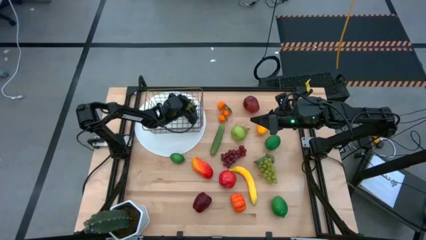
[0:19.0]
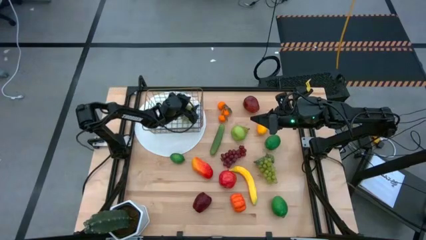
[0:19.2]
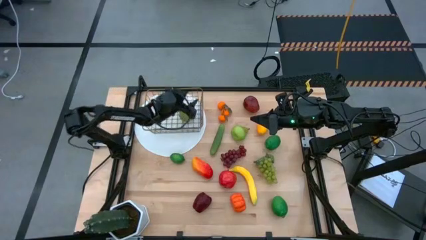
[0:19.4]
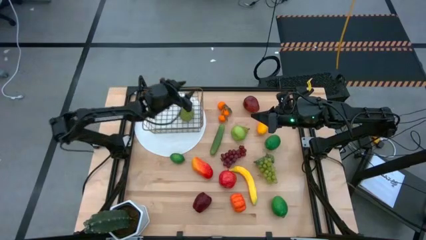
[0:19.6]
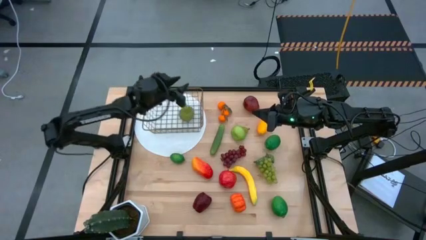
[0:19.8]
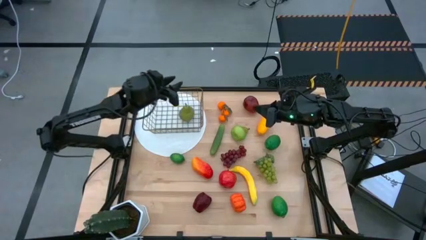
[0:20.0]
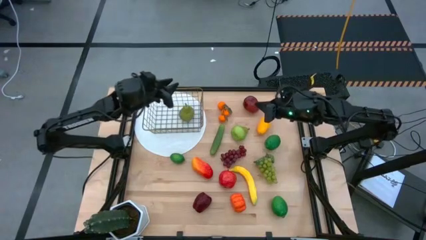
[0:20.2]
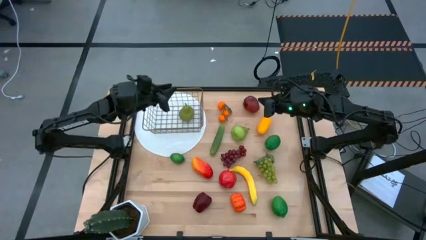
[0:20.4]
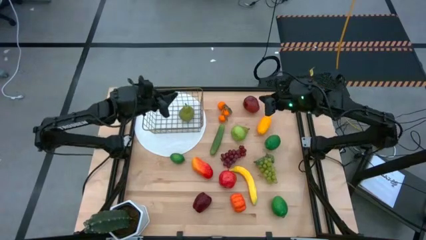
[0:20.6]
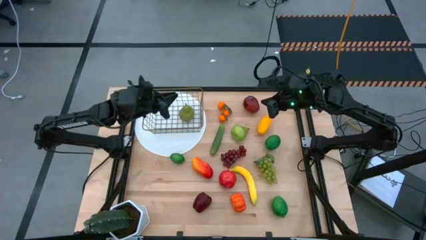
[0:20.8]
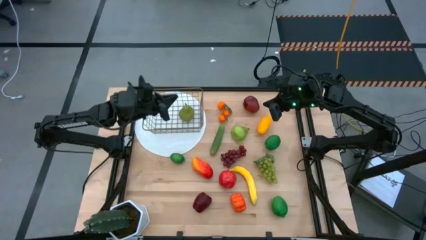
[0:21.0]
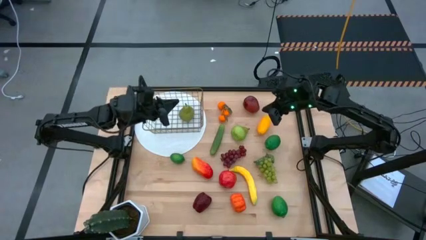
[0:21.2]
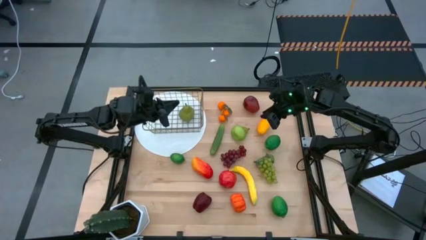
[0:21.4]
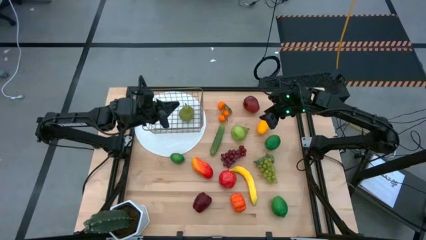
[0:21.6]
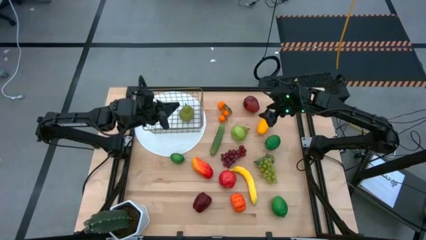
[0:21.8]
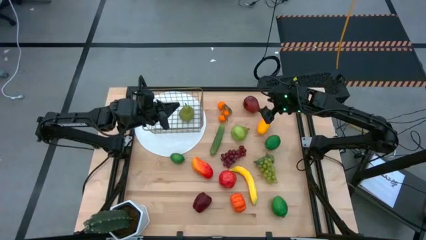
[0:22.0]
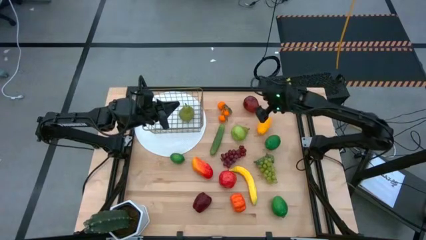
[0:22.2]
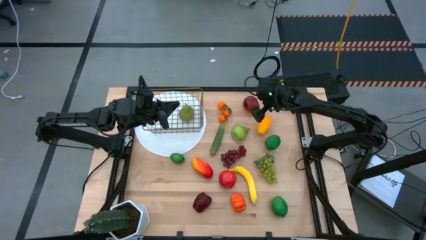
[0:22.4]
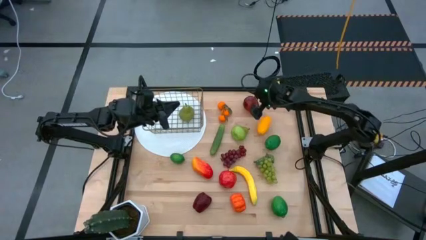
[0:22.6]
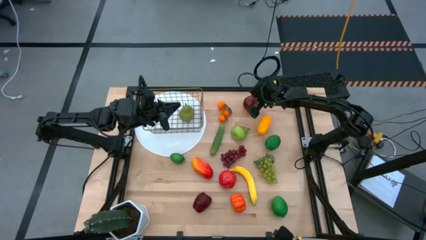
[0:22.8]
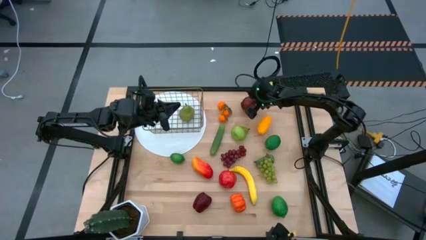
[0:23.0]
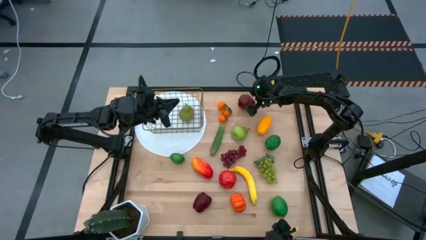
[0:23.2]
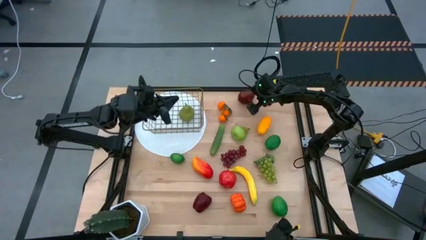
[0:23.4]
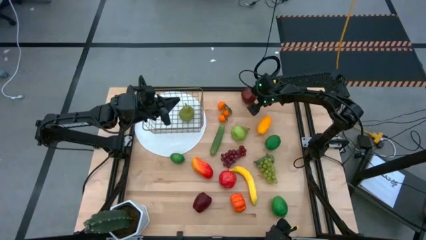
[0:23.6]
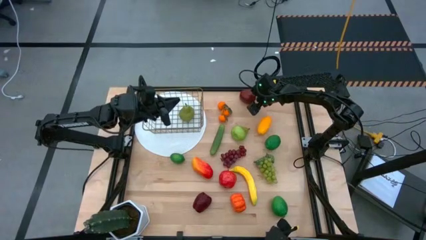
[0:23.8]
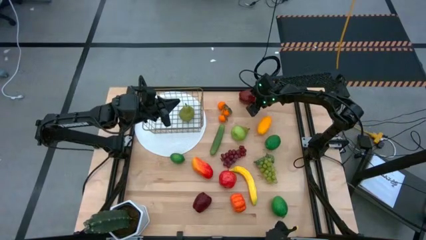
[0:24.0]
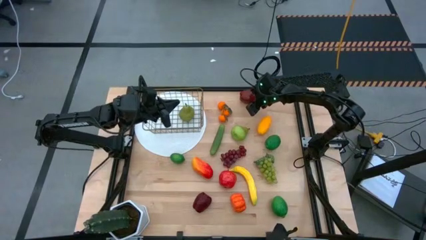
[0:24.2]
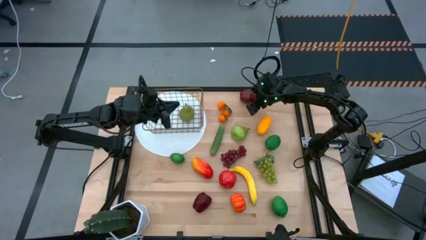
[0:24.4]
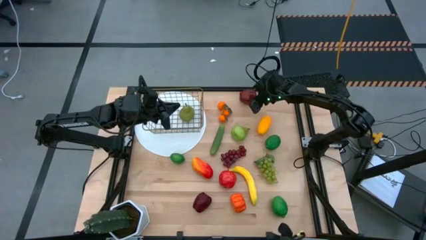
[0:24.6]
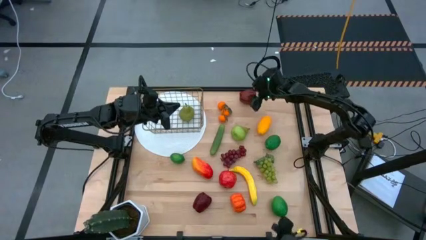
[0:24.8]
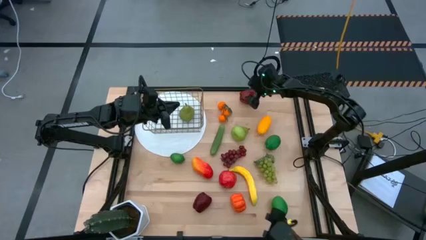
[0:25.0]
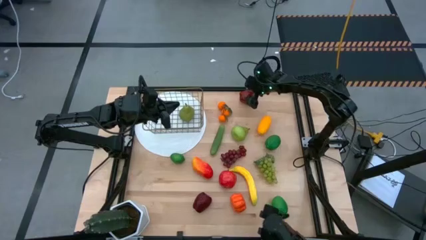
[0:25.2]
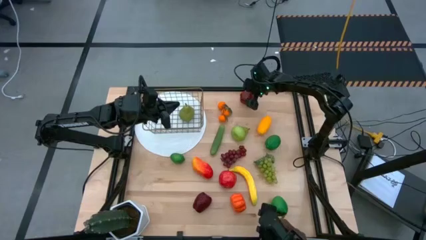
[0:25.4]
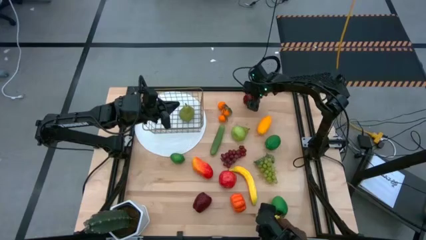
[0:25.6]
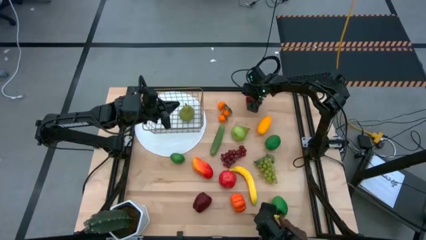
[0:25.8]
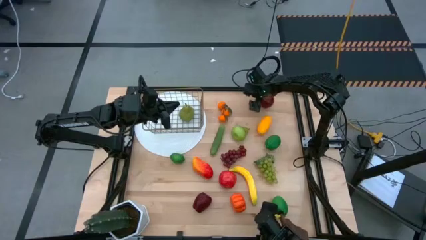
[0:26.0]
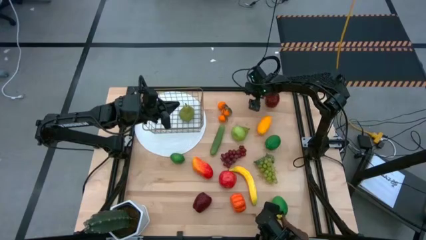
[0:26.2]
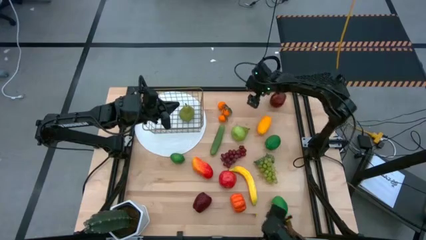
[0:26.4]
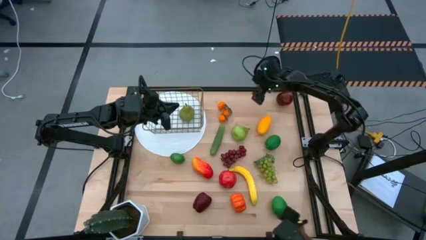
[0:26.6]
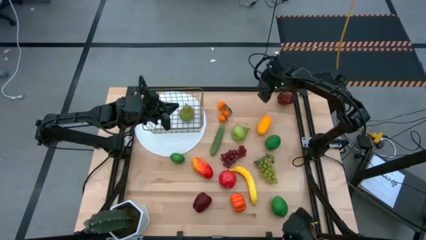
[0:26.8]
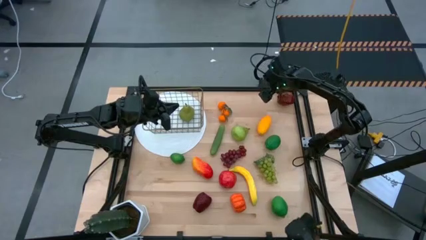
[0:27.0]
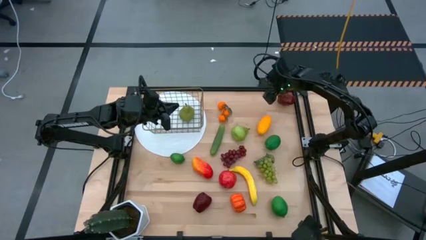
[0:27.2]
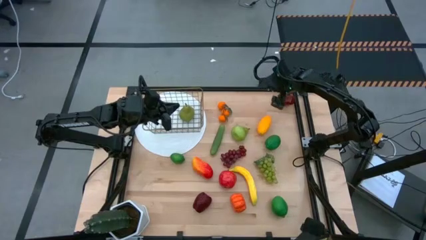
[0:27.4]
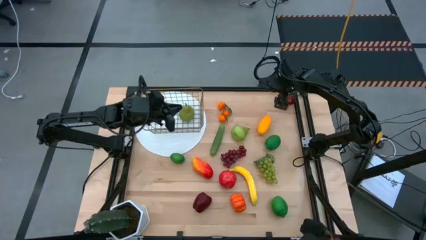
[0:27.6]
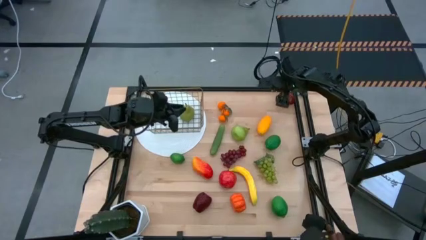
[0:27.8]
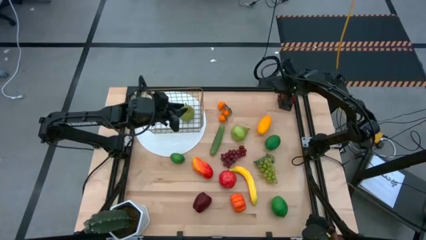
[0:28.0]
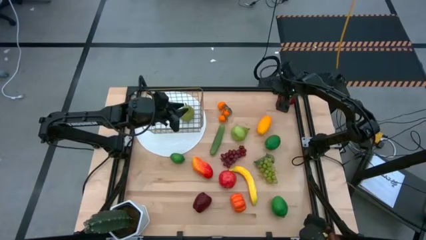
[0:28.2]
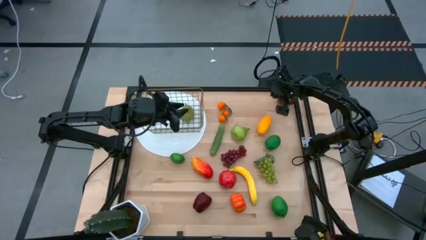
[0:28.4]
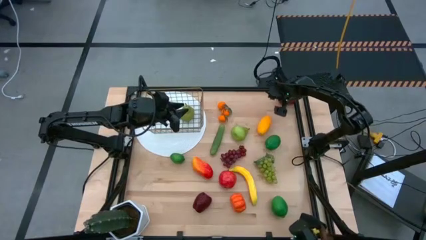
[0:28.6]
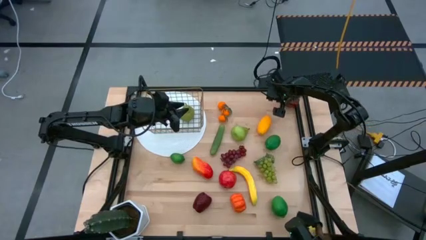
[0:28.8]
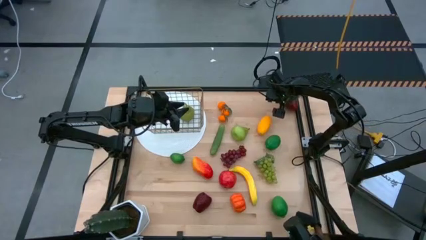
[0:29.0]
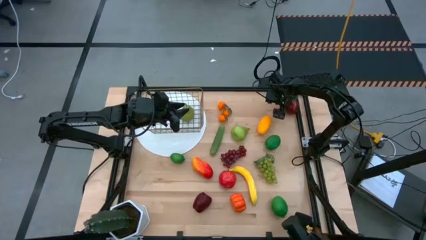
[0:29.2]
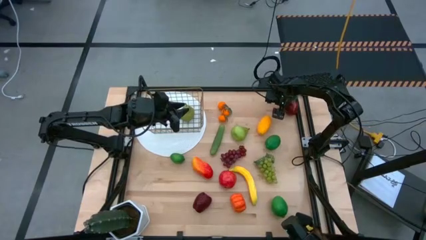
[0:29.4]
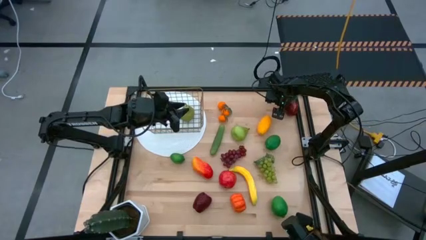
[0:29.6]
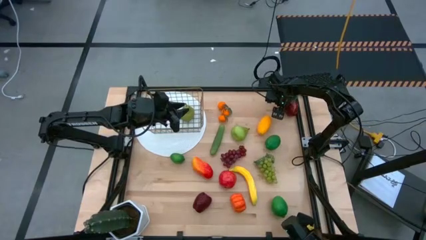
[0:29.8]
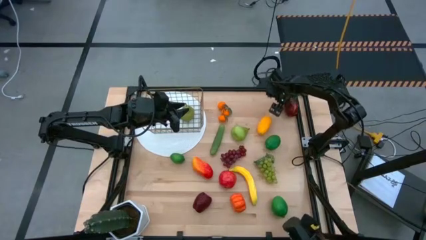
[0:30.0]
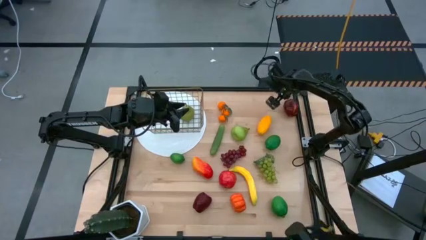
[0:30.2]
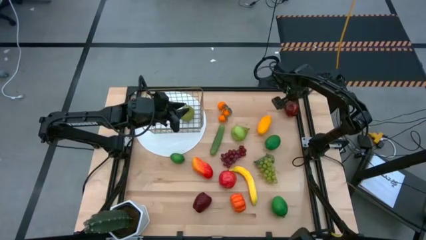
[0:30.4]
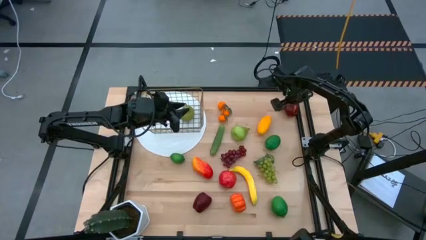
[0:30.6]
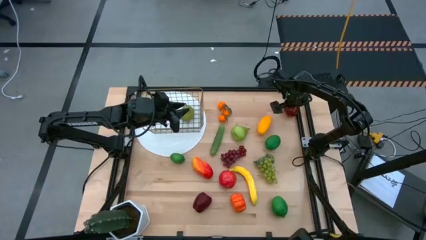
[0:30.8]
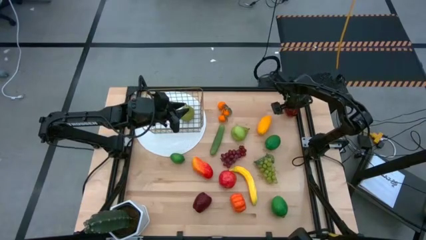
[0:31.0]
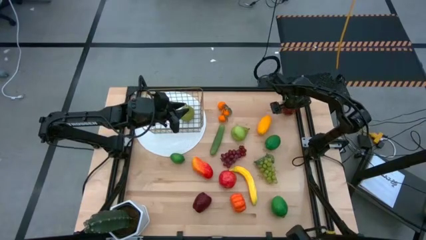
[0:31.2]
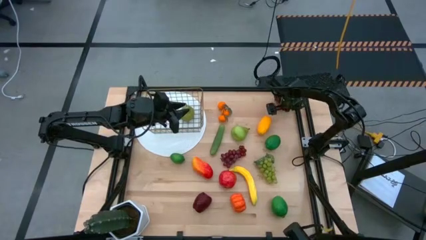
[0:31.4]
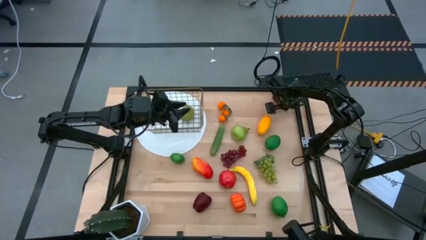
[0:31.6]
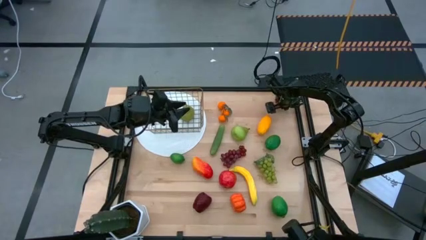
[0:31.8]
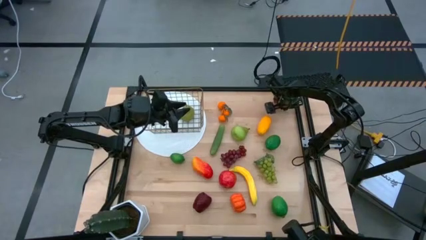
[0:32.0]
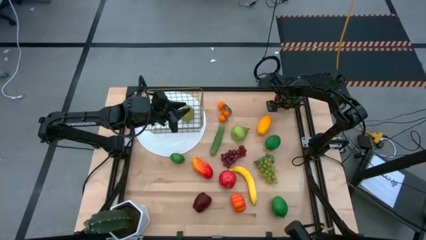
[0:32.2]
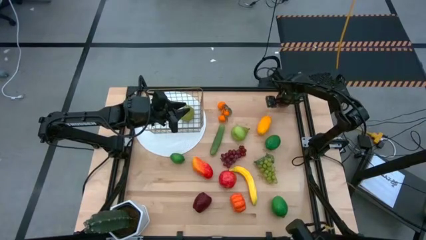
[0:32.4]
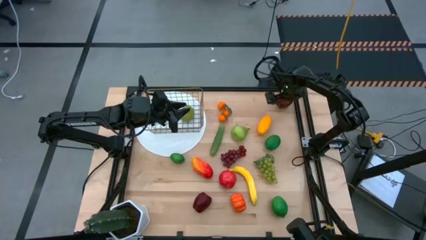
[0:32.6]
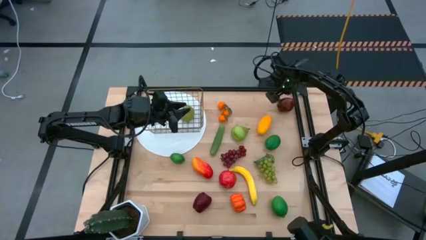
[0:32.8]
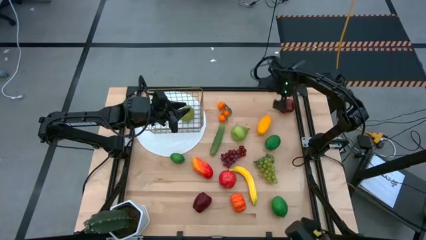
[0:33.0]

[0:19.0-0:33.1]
Task: Build produce basket
Put the top apple into the wired basket

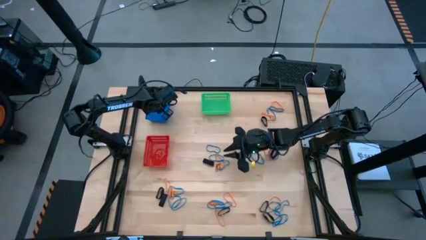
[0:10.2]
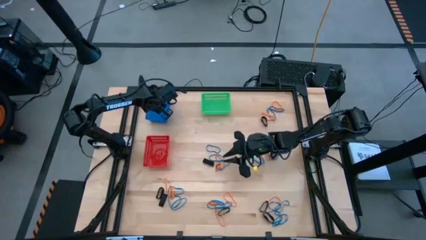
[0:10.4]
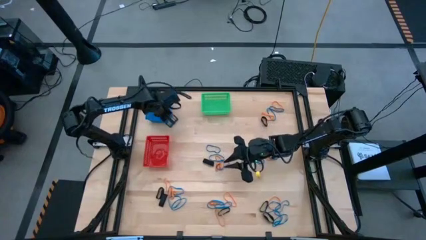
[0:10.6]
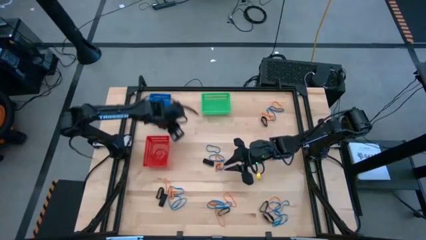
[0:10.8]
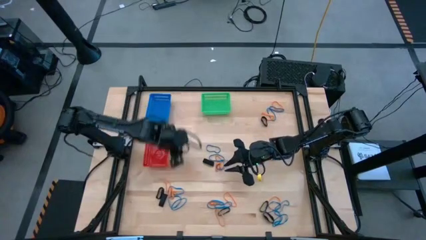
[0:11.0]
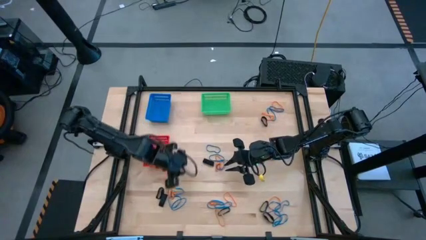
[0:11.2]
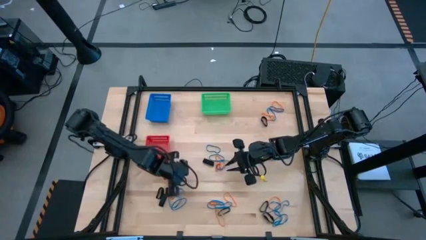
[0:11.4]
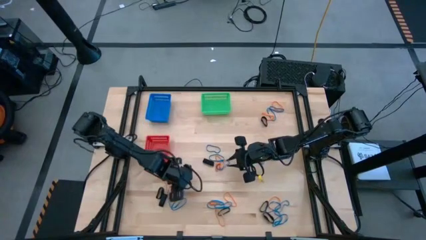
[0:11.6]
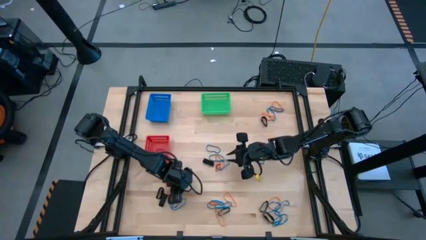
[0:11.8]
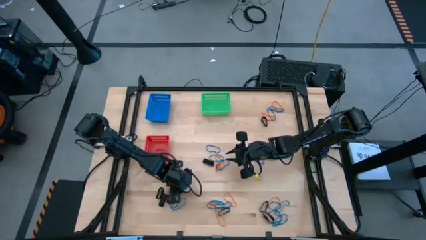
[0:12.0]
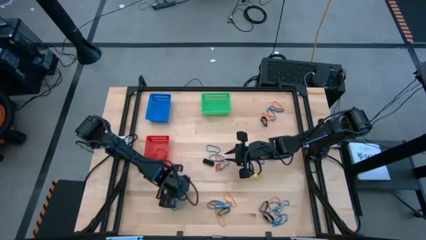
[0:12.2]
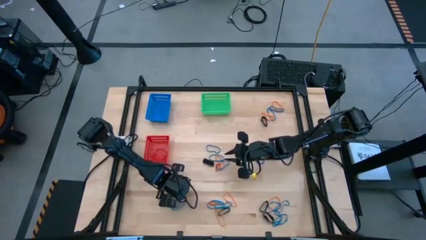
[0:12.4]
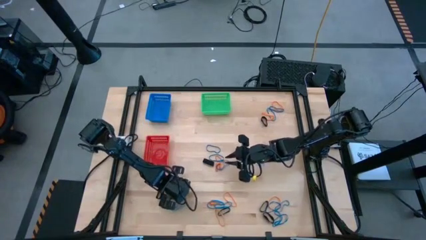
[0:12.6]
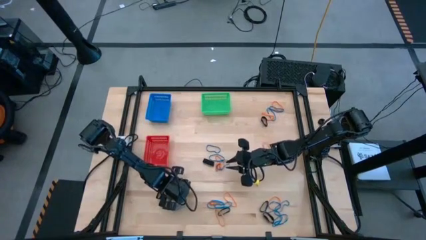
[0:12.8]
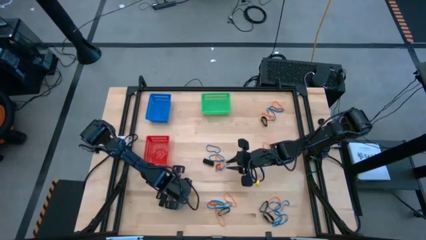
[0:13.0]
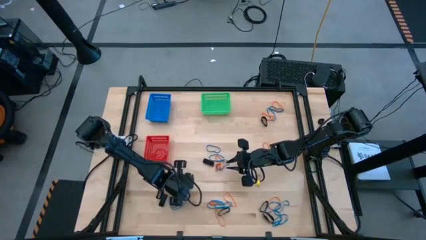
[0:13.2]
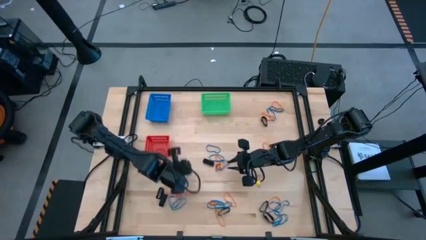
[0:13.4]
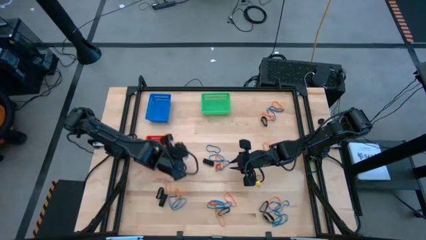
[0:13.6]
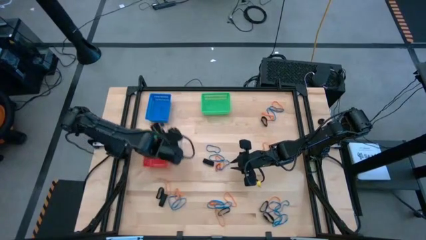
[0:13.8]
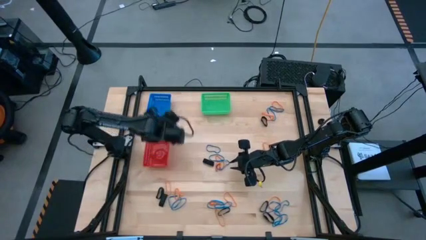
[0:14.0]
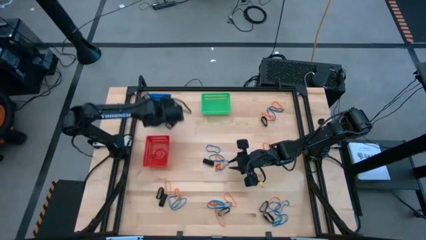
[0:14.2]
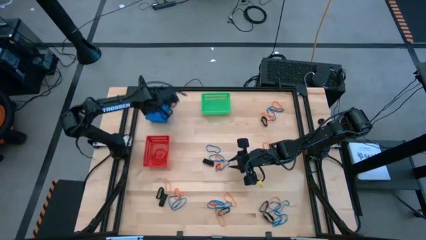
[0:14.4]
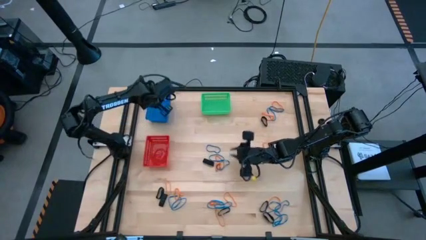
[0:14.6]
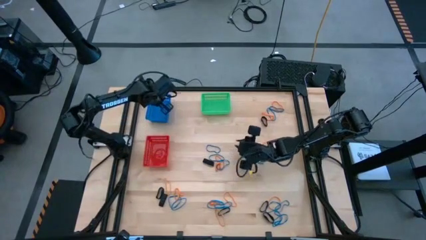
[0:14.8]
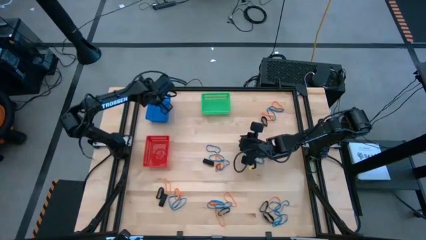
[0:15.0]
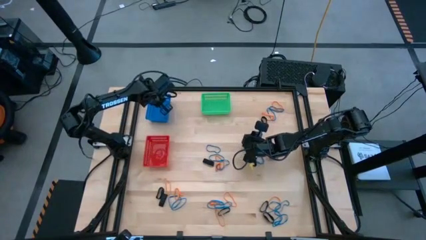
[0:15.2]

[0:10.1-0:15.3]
Task: Sort rubber bands into baskets
Put the blue rubber band into the blue bin
